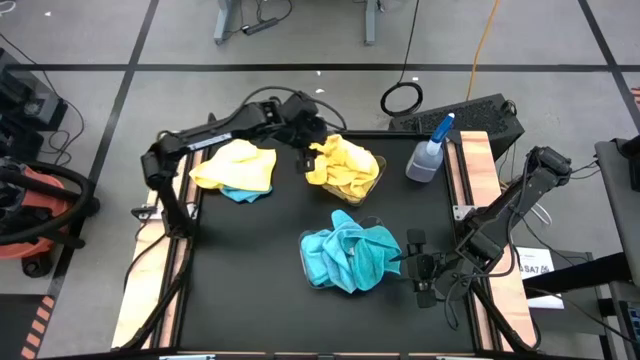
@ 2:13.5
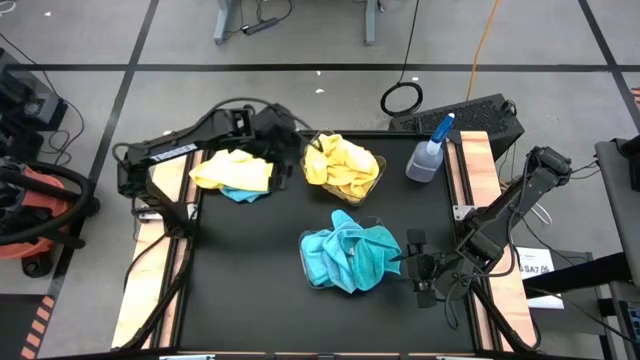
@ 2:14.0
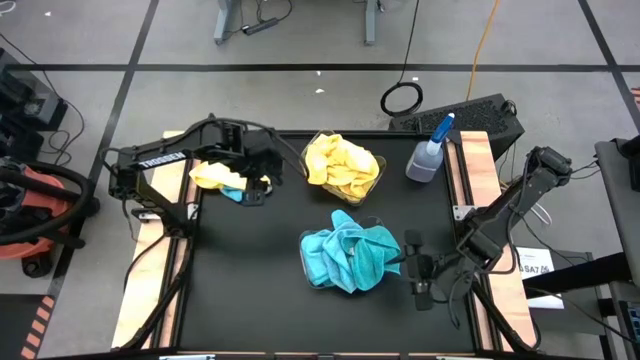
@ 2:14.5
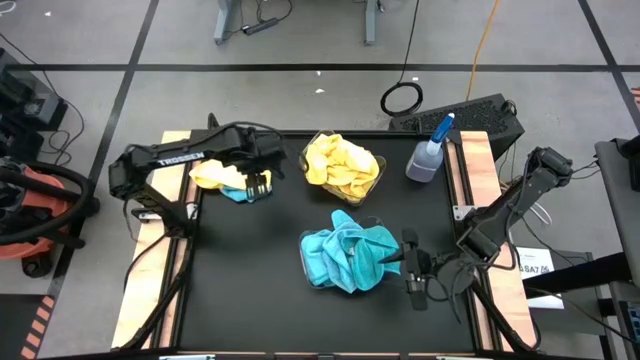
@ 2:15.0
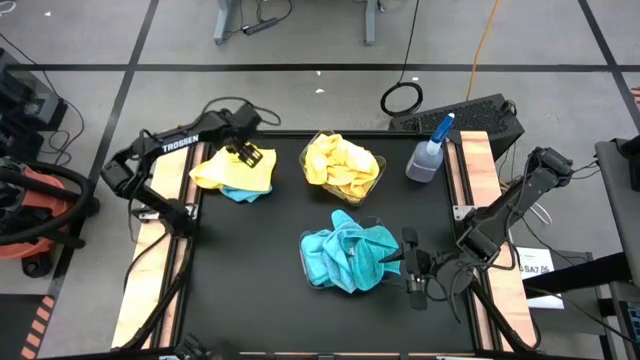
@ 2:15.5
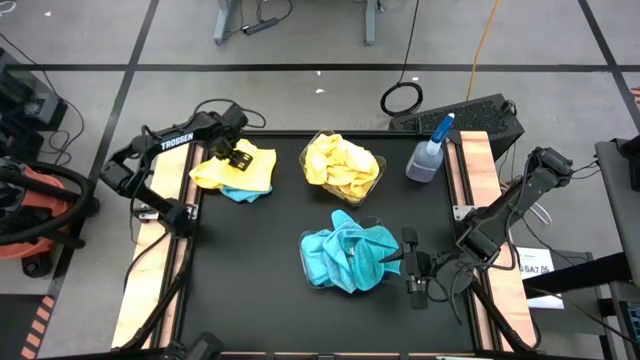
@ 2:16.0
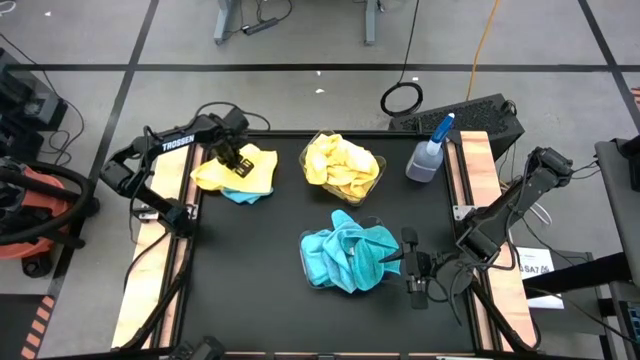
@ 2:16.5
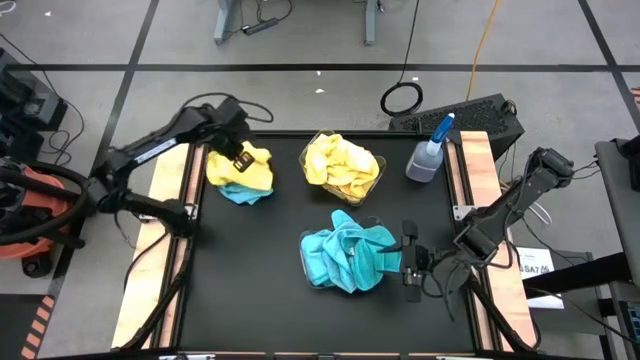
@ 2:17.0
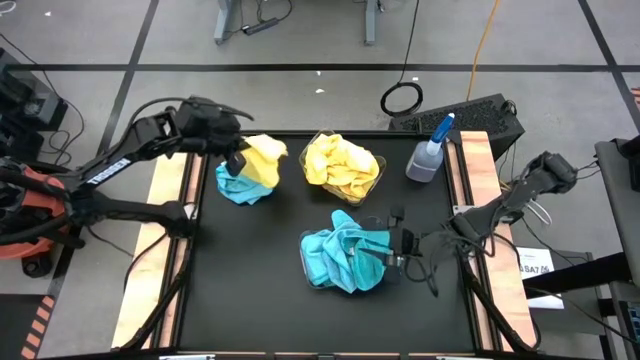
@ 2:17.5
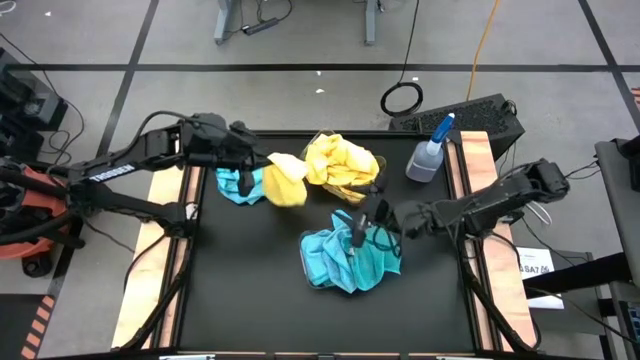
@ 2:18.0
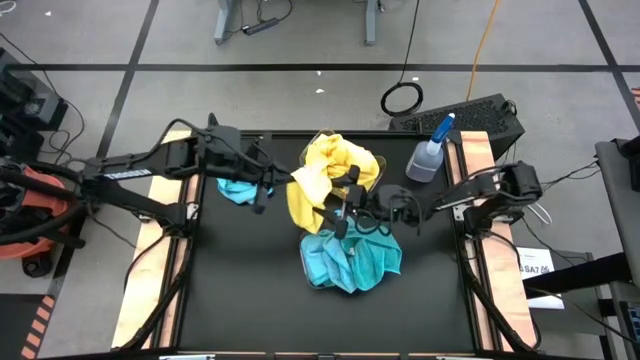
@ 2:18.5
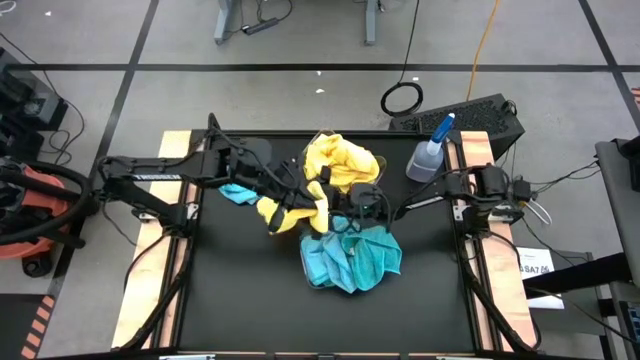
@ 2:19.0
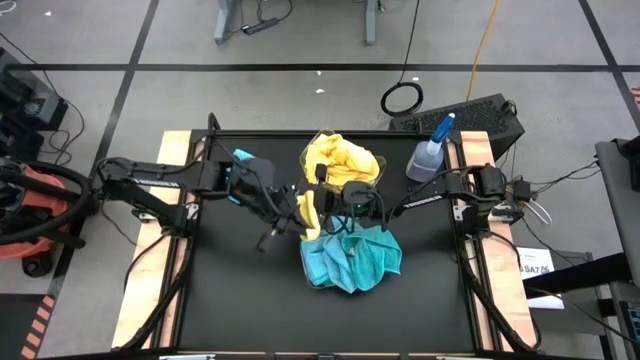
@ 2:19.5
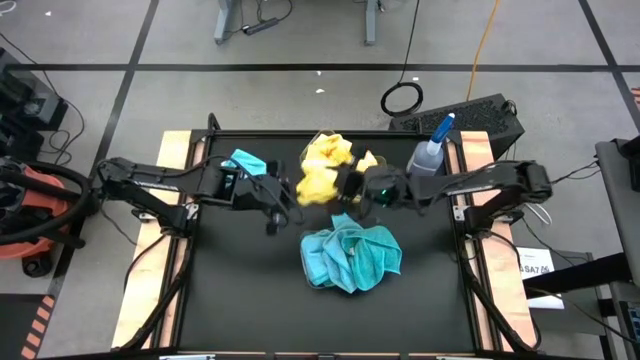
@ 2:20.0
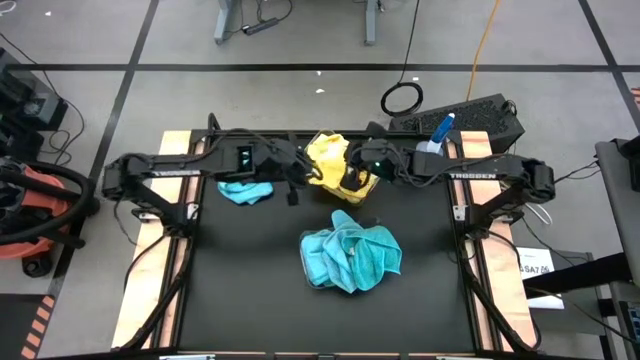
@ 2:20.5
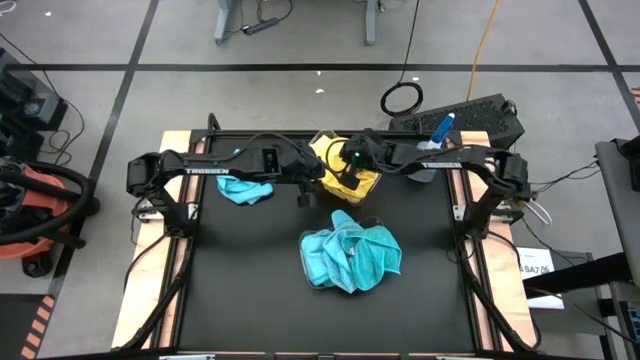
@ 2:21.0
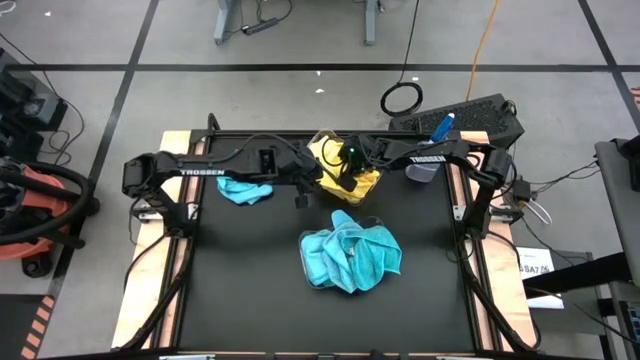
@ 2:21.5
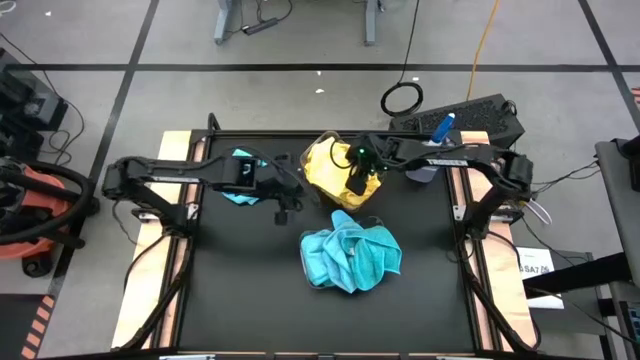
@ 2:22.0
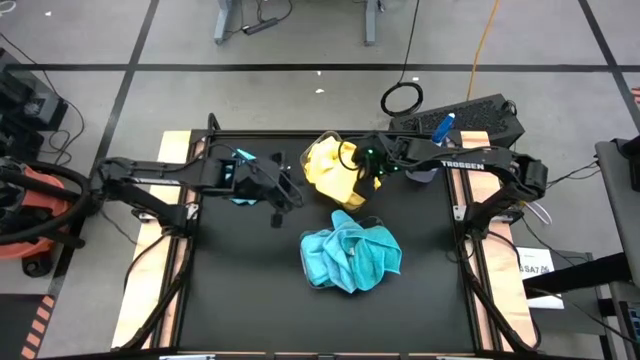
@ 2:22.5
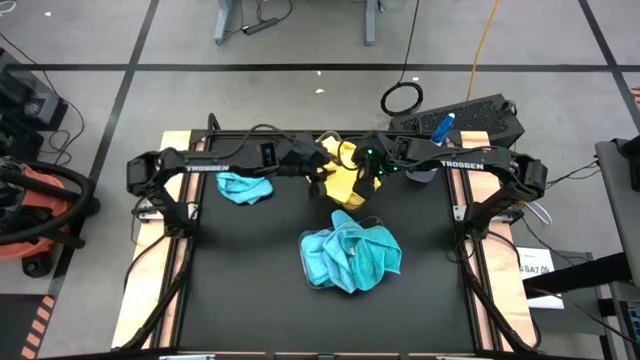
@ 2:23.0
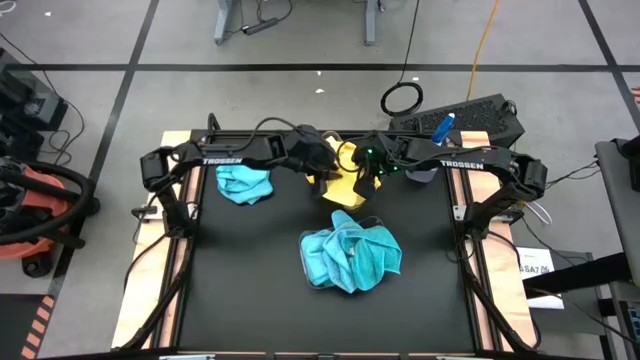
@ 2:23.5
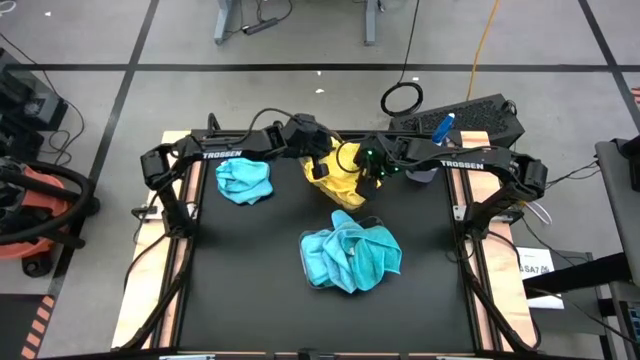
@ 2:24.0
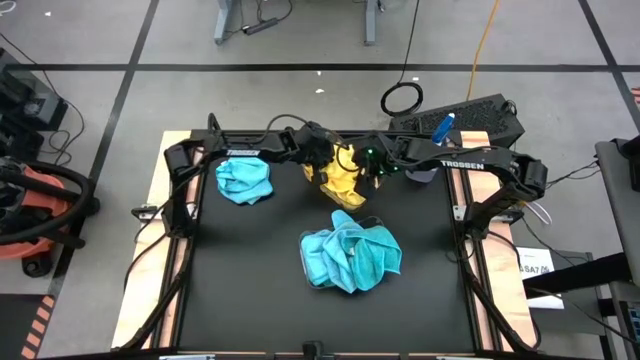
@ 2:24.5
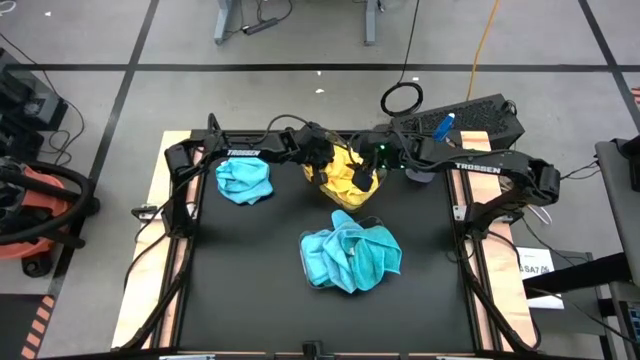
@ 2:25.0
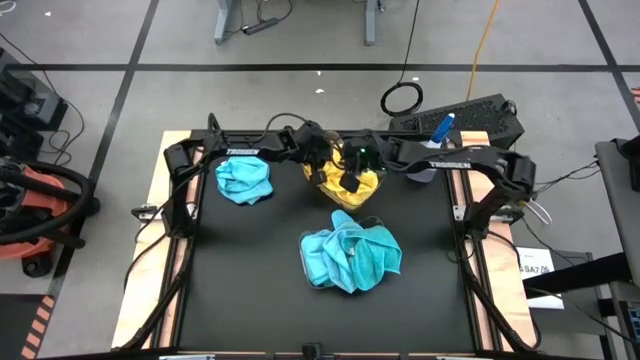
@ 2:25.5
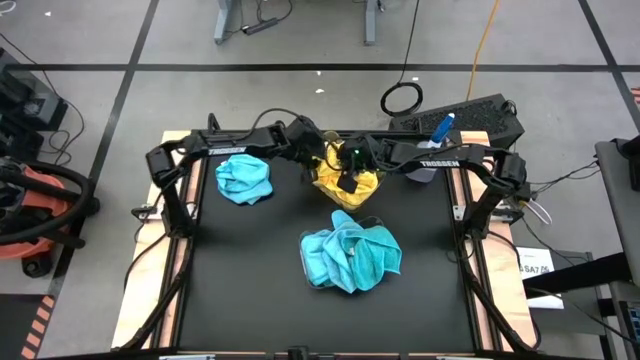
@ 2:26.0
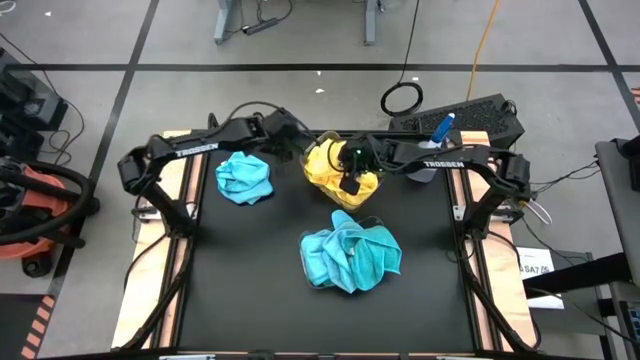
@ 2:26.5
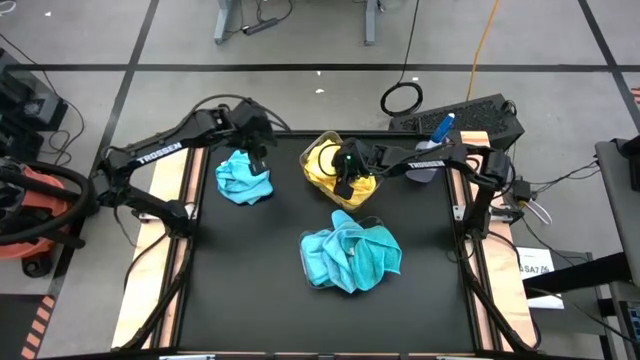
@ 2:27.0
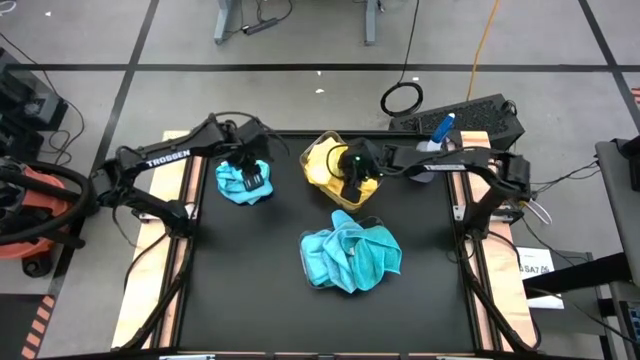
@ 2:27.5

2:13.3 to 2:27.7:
Task: Sort microfiber towel by color & place in baskets
Put the yellow microfiber cloth into the top transparent bin

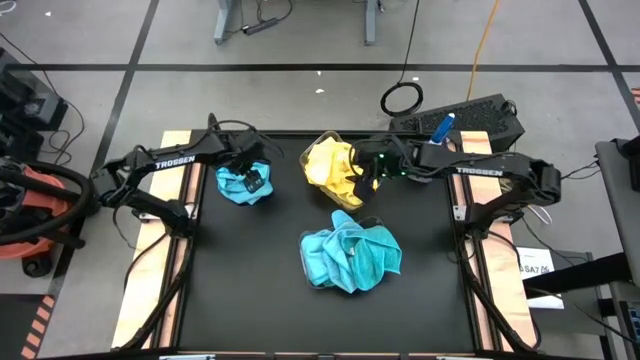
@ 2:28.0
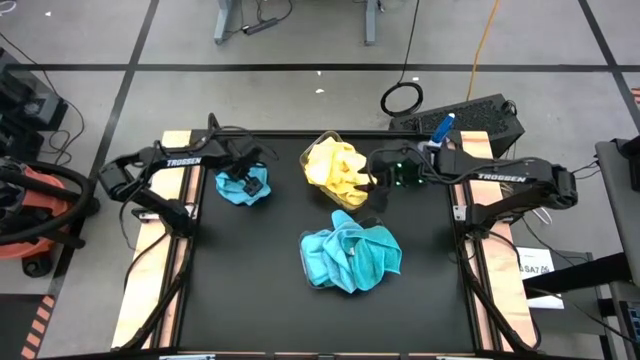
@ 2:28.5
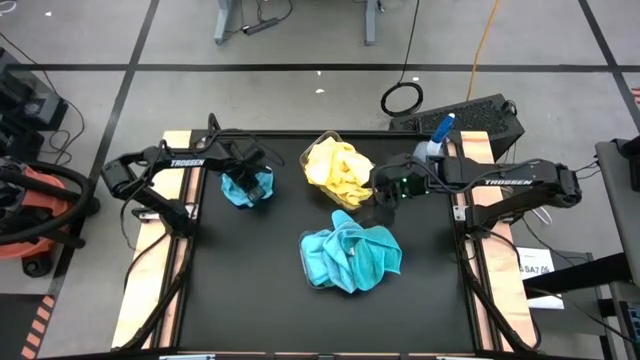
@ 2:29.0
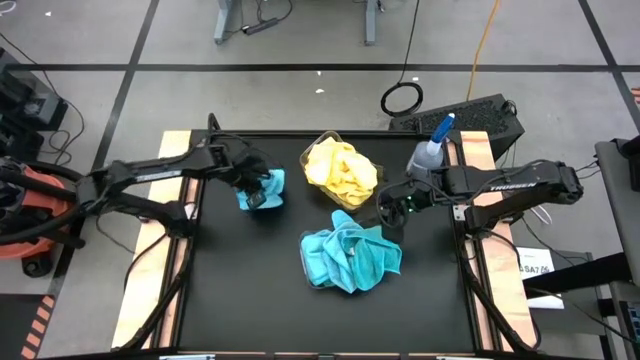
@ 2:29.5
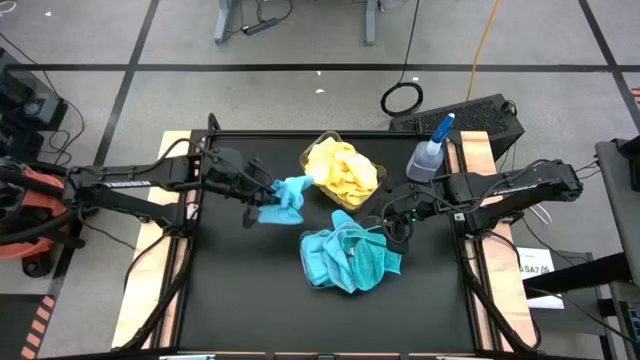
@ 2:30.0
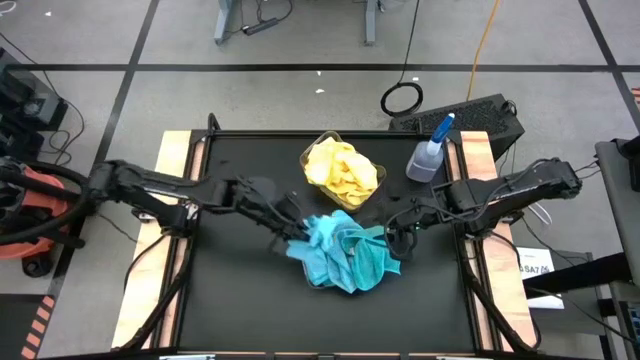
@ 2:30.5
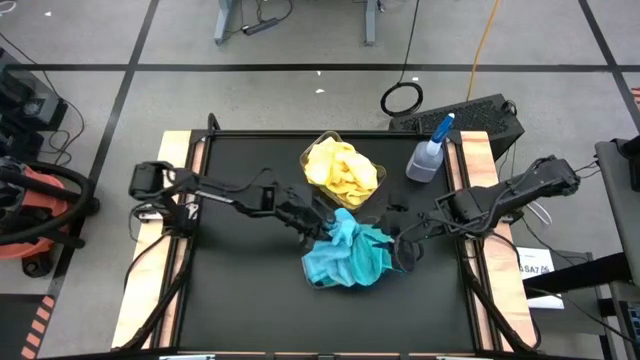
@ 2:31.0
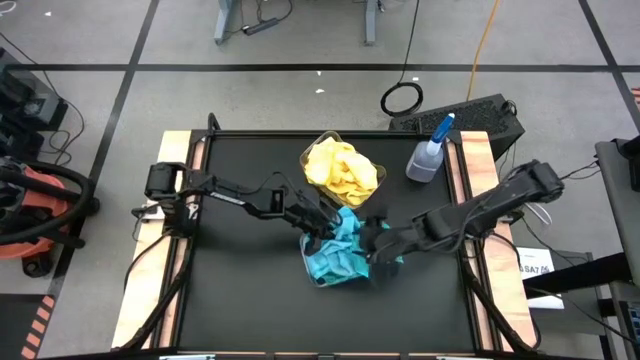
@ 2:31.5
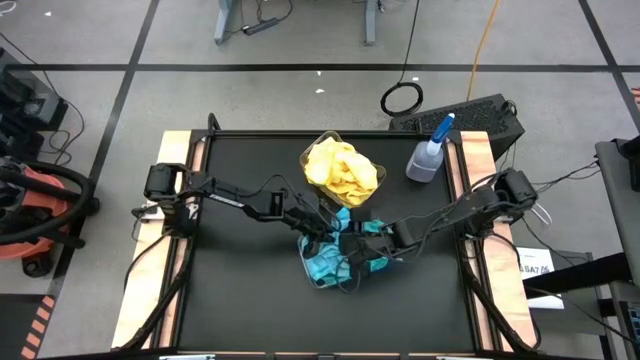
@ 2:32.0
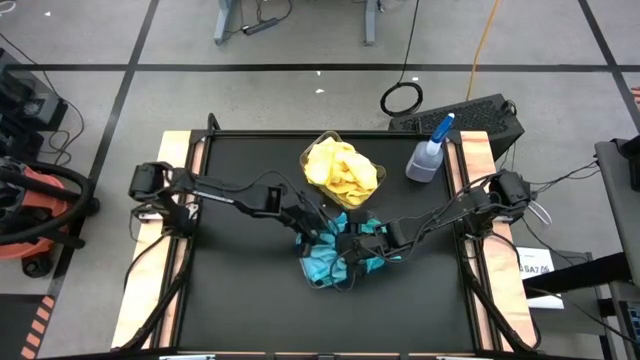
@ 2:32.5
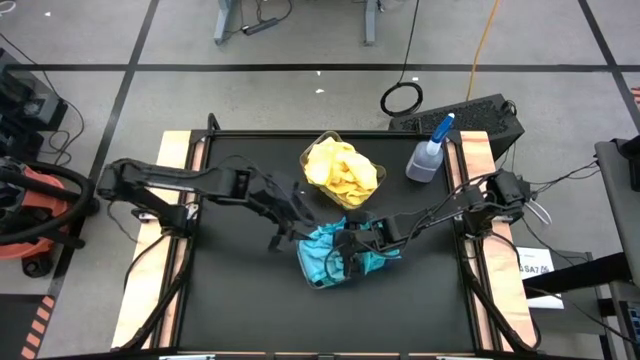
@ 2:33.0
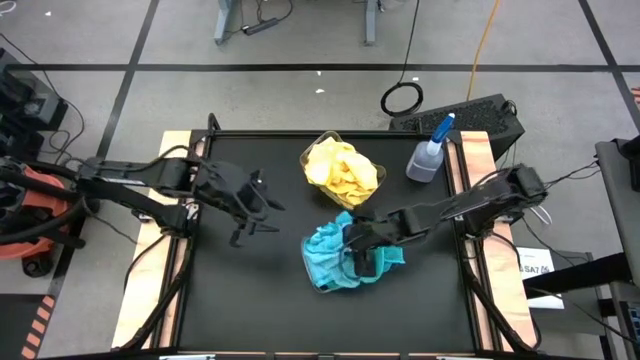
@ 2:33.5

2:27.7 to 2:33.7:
Put the blue microfiber cloth into the bottom transparent bin

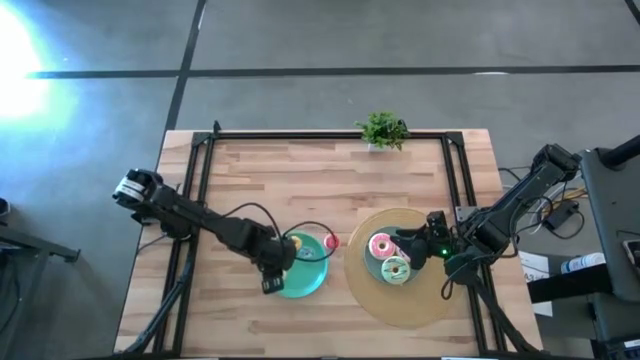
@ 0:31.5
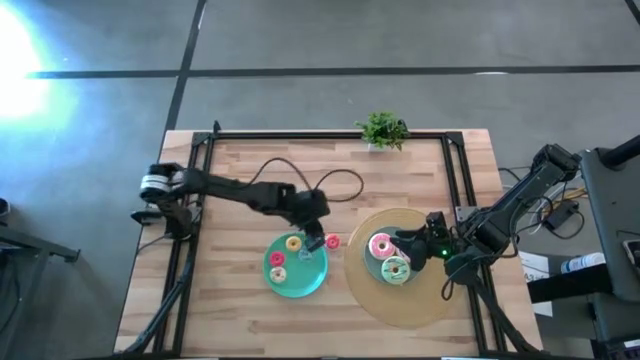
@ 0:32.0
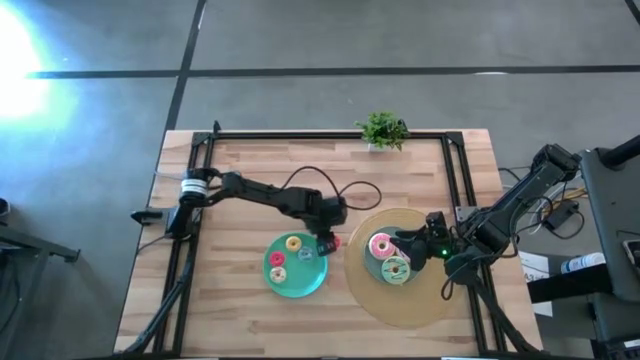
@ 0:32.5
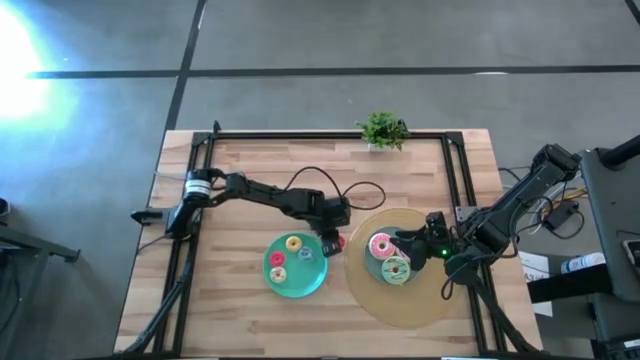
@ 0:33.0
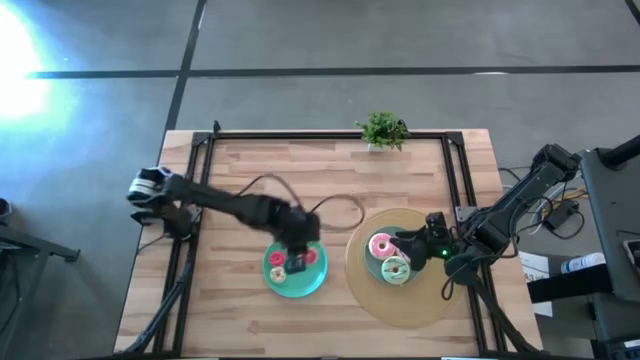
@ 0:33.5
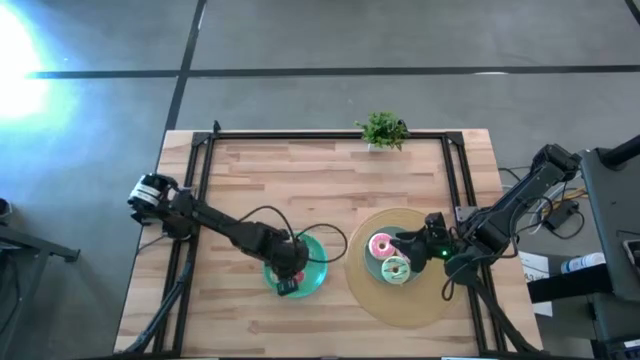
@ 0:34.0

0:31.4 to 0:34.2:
Task: Pick & Place donuts
Put the small red donut on the blue plate
